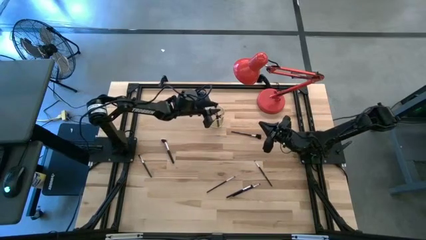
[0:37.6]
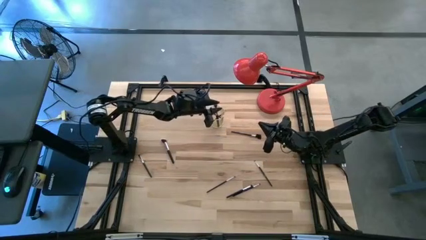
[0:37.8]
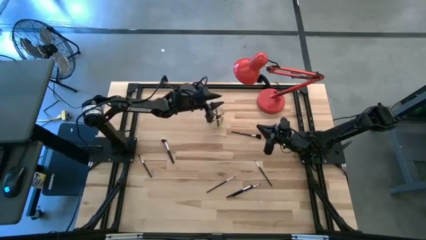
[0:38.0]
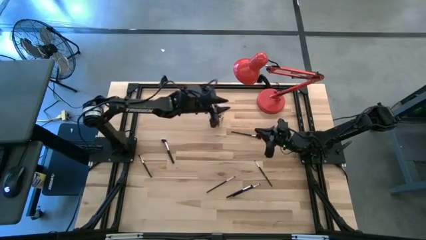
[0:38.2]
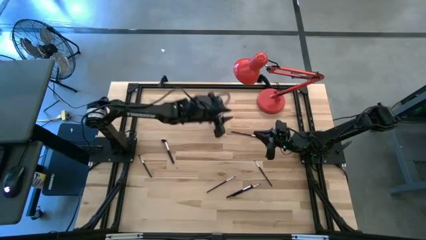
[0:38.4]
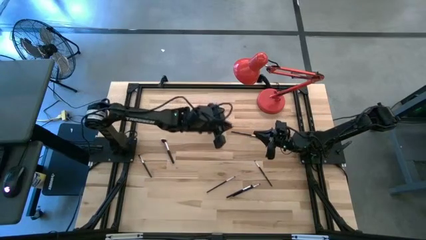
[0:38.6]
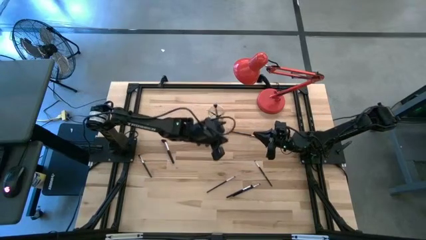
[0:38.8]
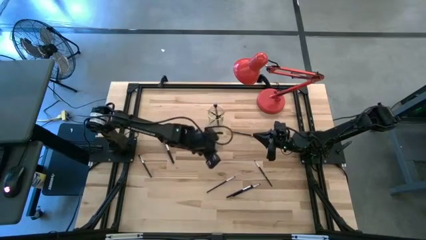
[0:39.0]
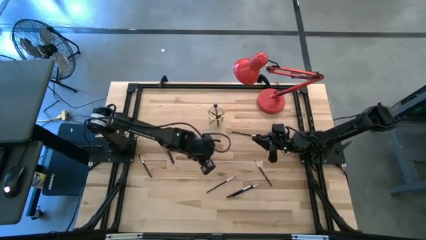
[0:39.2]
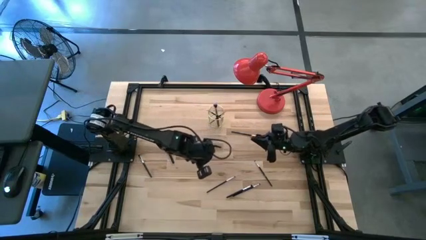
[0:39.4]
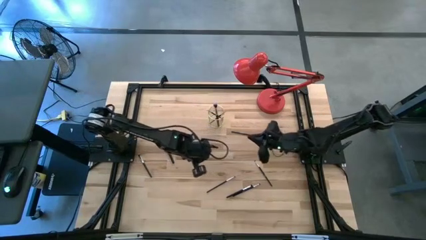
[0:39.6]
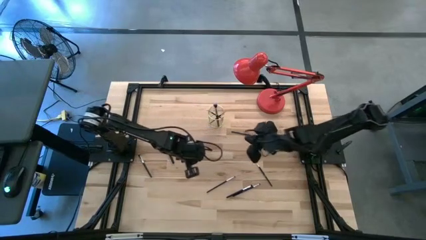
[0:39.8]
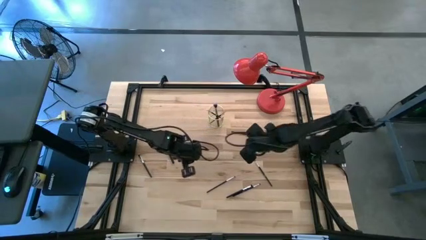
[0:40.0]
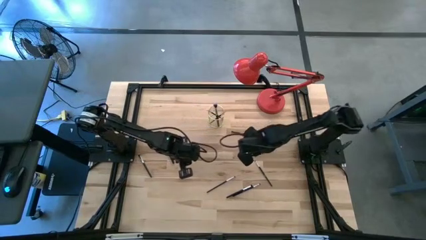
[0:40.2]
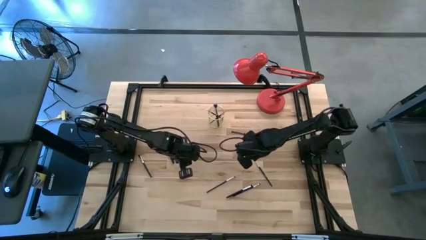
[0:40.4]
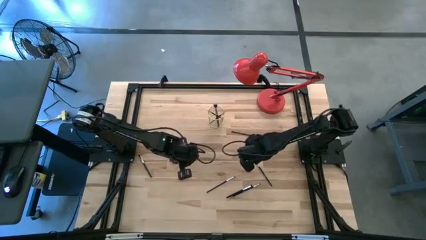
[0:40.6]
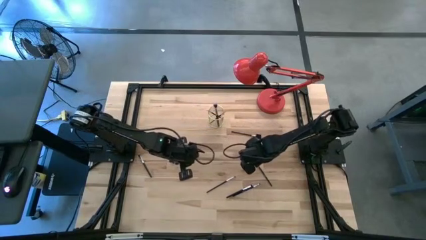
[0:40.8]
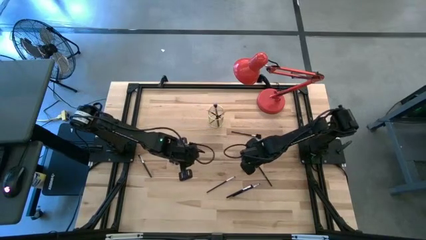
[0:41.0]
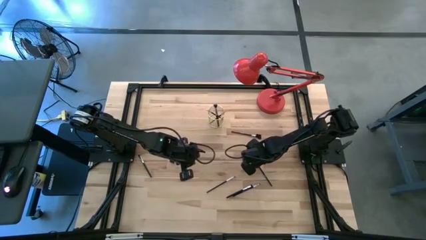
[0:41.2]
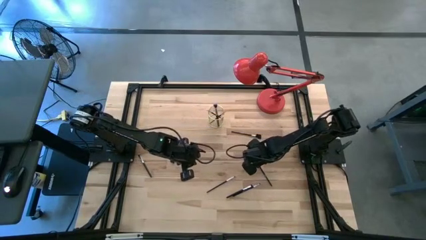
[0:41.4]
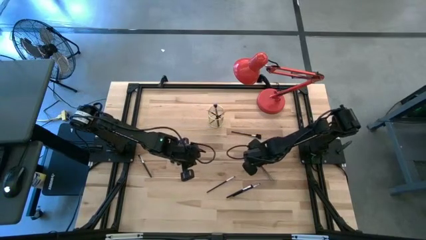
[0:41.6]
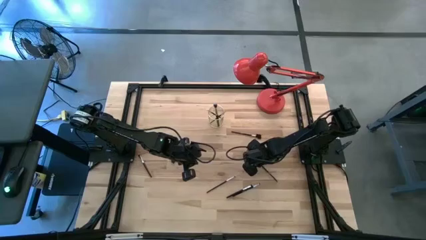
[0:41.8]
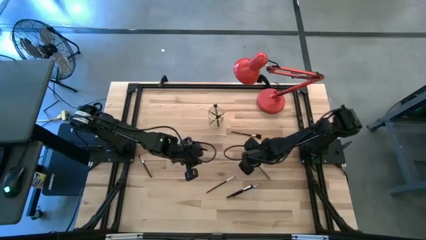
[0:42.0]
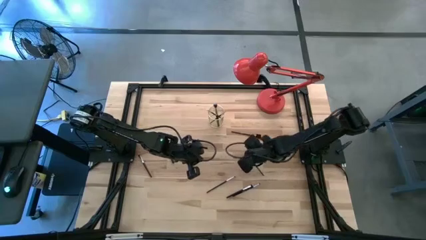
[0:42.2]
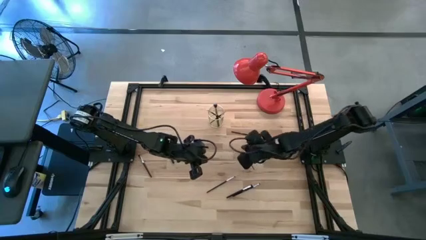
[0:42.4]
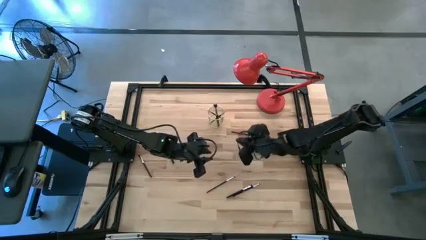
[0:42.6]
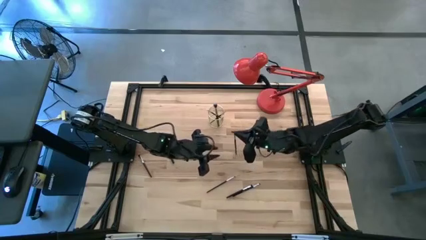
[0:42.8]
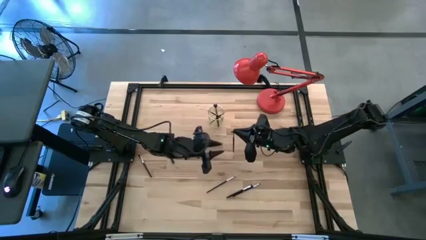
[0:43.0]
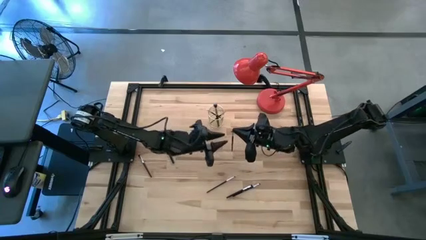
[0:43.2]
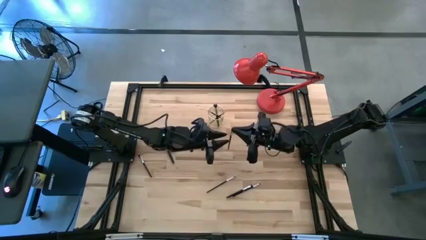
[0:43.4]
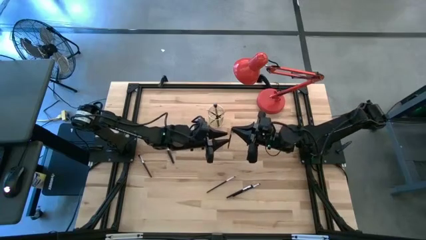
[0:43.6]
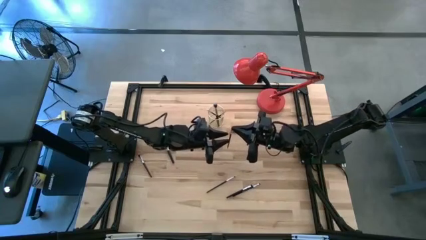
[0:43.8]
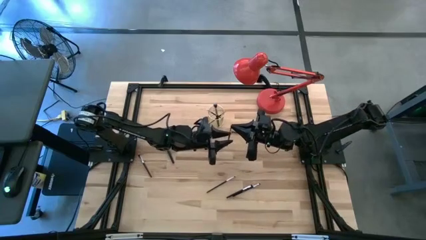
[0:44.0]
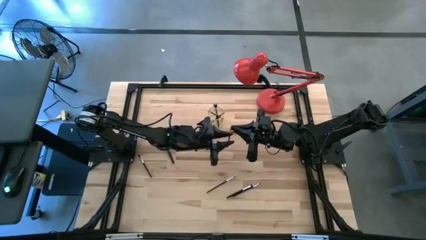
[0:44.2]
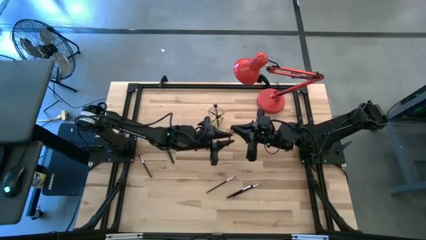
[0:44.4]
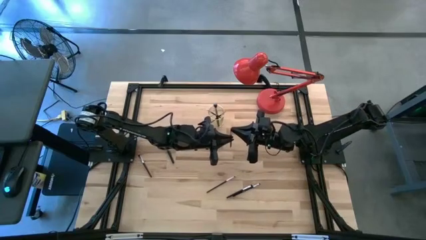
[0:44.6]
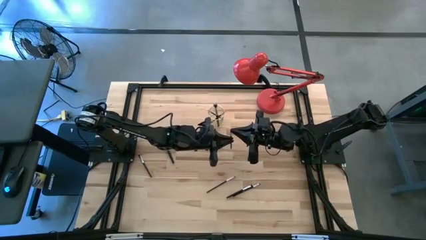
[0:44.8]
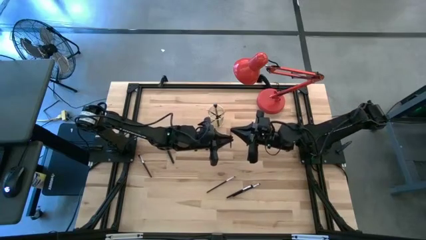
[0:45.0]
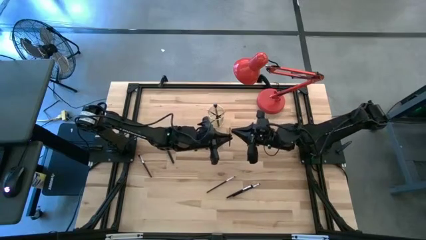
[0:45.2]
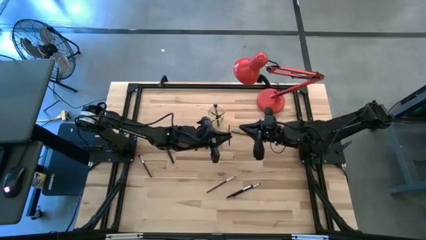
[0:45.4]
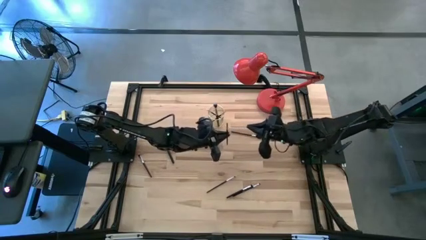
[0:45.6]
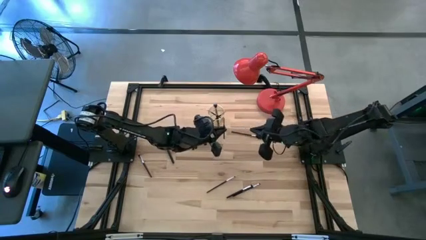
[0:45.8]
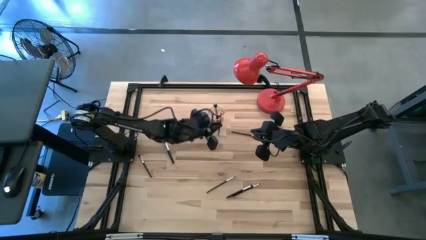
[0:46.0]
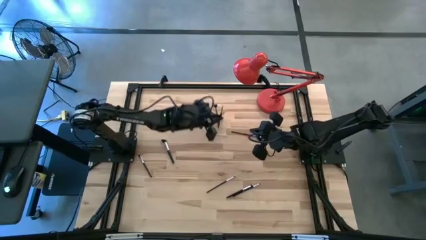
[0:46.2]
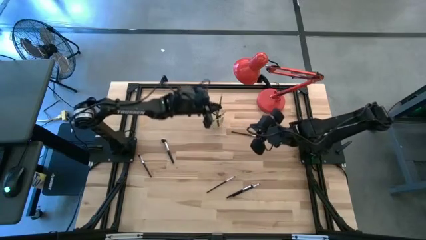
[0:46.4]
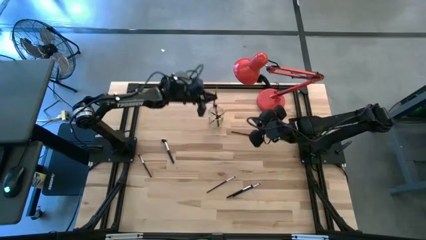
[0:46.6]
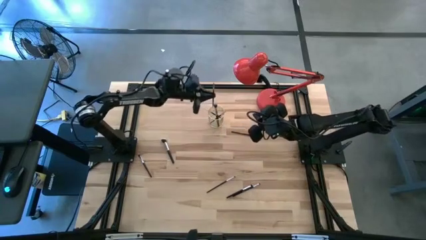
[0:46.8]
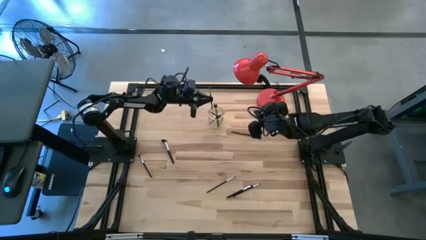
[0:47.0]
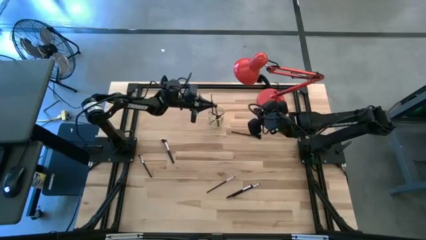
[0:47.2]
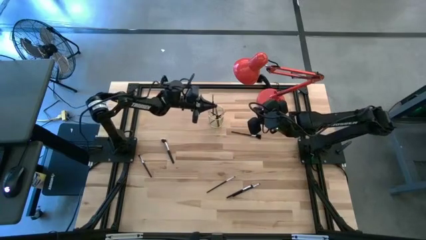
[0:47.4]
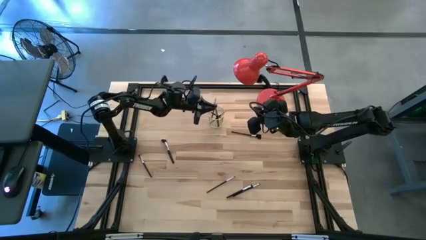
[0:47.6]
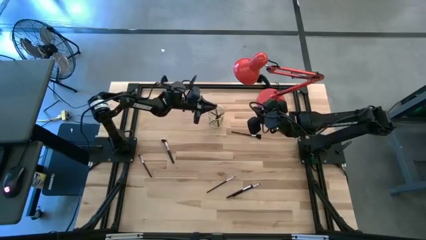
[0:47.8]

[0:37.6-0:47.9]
Task: Pick & Place Makeup Brushes
Put the eyeshadow brush into the makeup brush holder

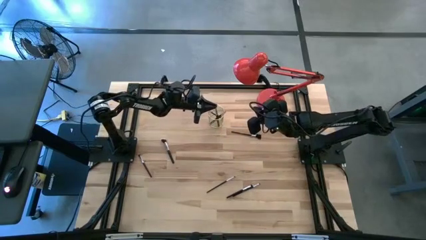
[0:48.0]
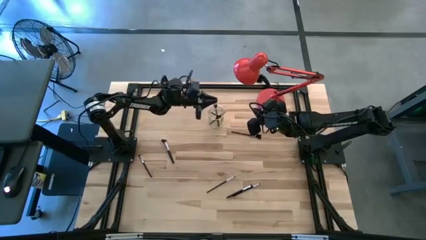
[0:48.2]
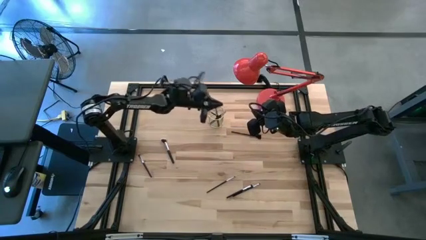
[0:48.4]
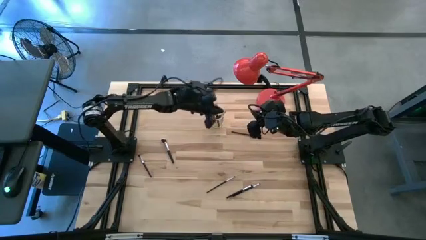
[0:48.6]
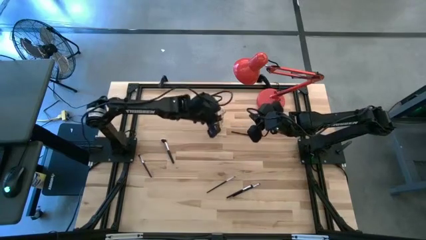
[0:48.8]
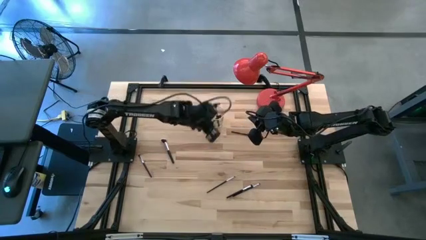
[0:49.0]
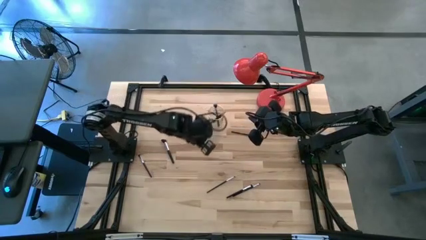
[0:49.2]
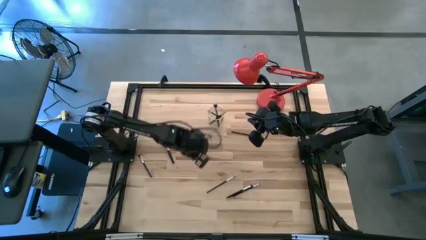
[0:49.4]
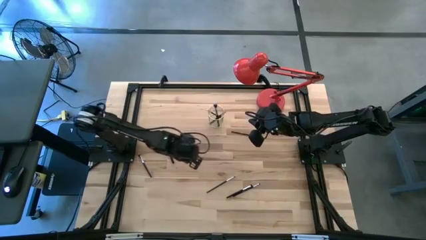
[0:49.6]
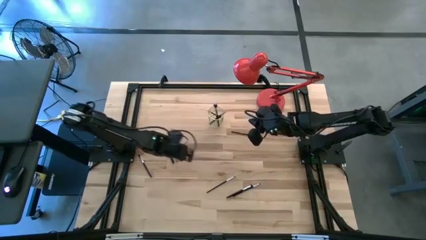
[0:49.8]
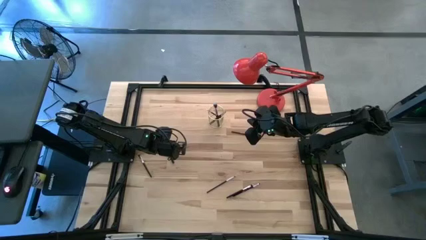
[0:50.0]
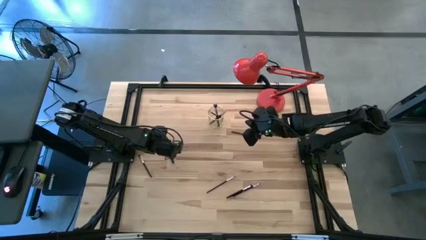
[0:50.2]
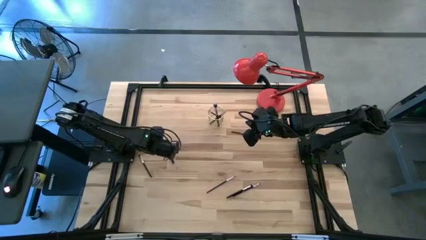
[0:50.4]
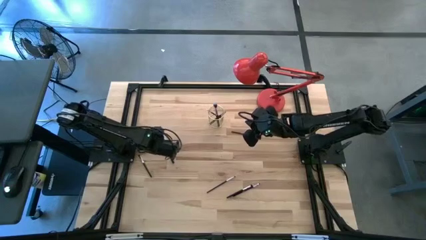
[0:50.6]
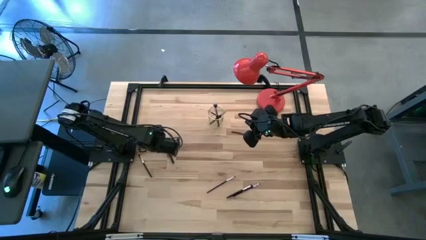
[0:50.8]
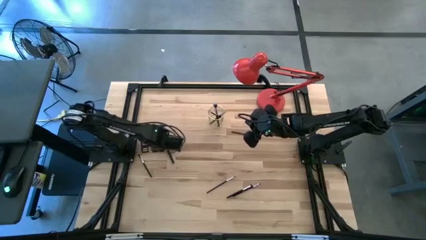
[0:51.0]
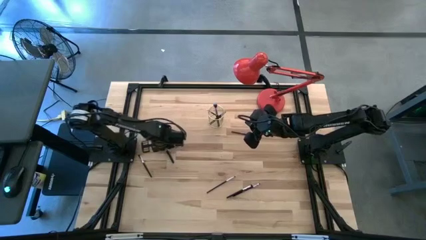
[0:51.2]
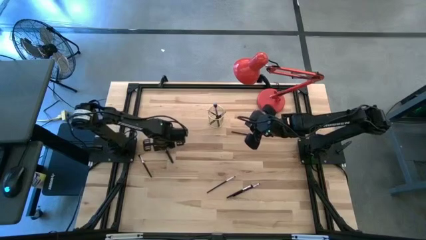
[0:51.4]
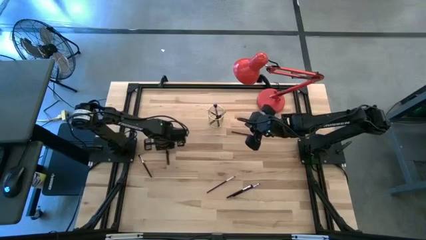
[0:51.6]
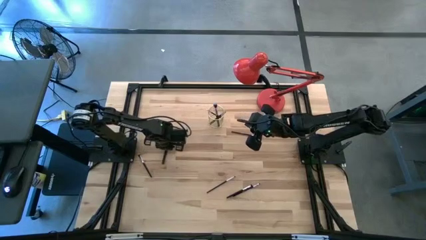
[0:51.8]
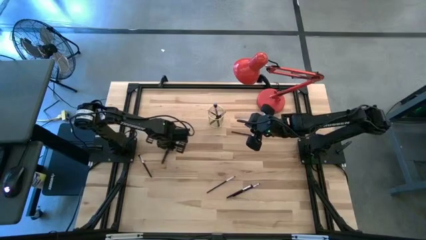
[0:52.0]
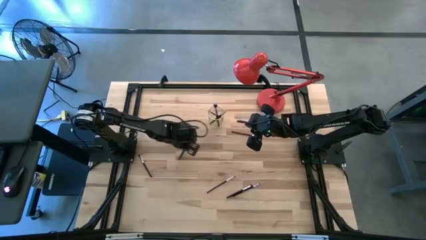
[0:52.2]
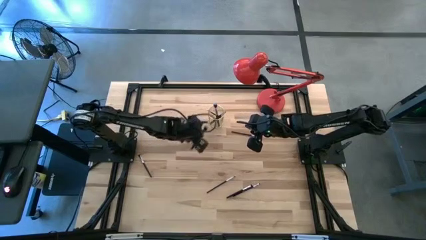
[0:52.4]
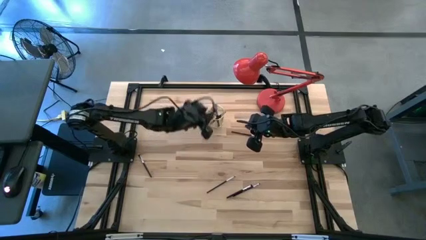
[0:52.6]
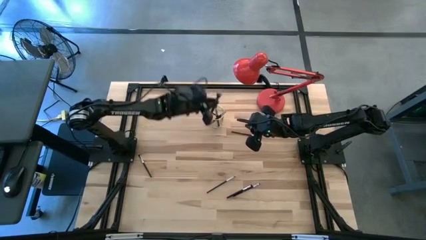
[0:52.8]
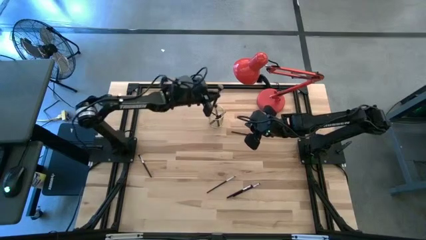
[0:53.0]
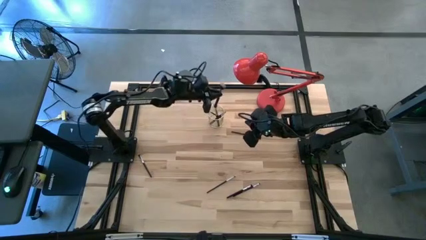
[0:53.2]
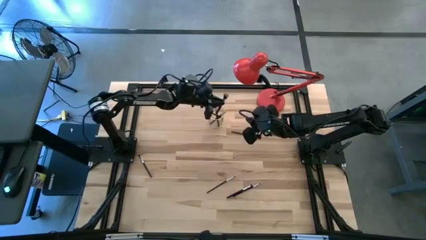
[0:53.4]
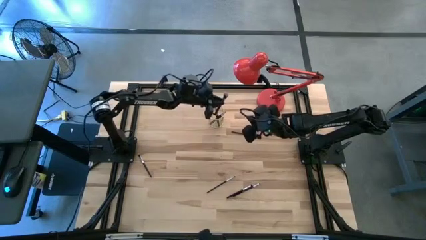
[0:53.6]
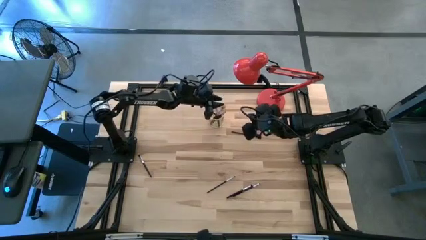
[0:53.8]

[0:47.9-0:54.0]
Put the blush brush into the makeup brush holder
